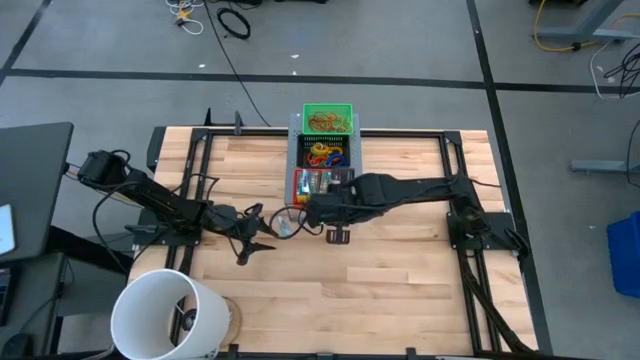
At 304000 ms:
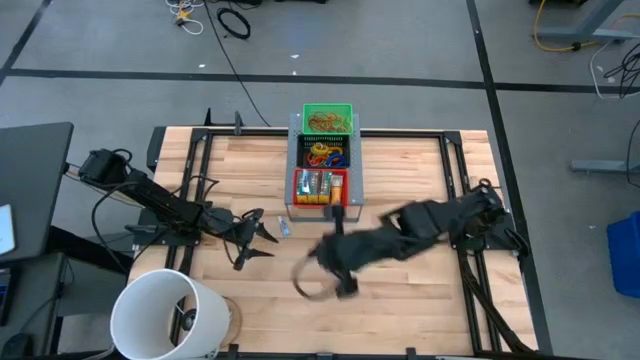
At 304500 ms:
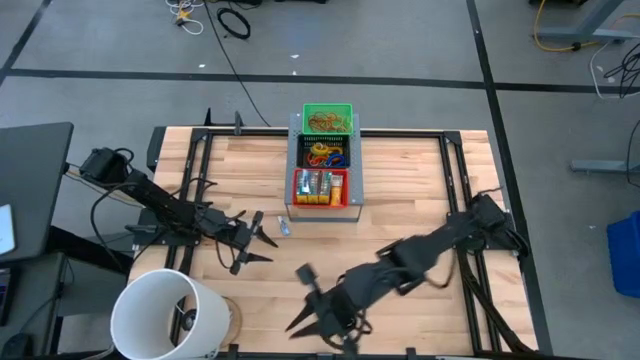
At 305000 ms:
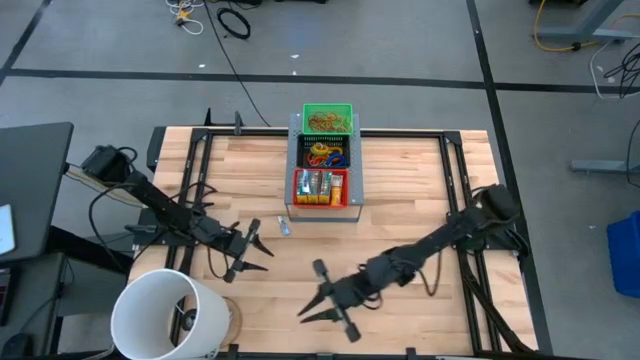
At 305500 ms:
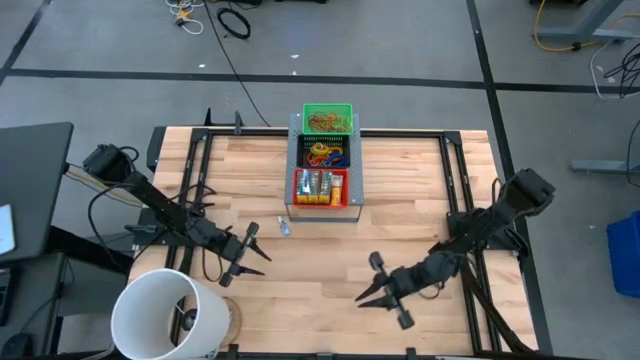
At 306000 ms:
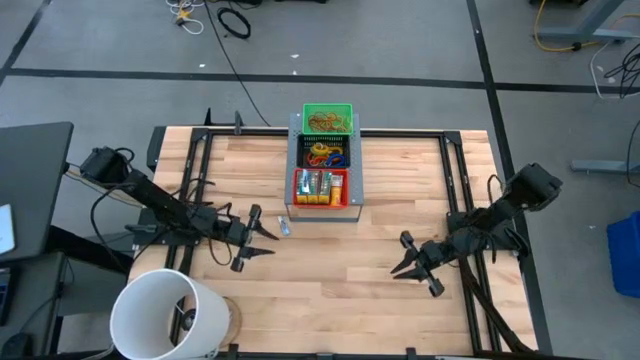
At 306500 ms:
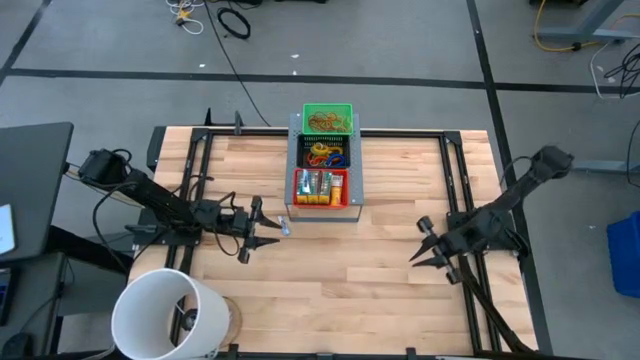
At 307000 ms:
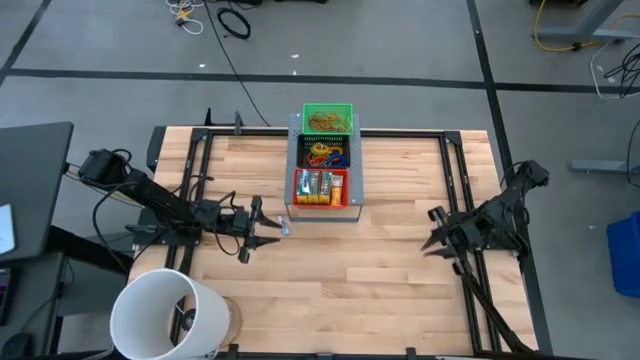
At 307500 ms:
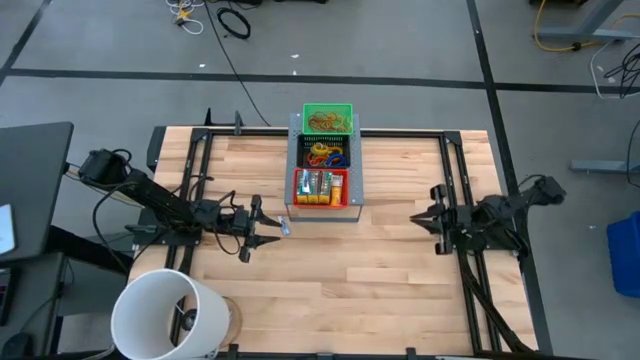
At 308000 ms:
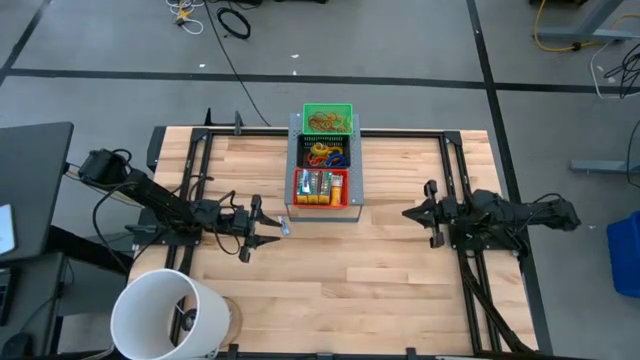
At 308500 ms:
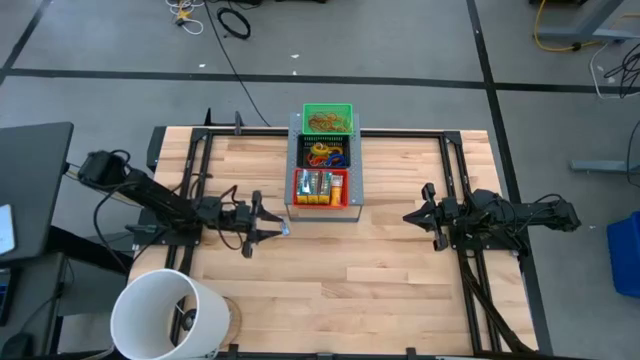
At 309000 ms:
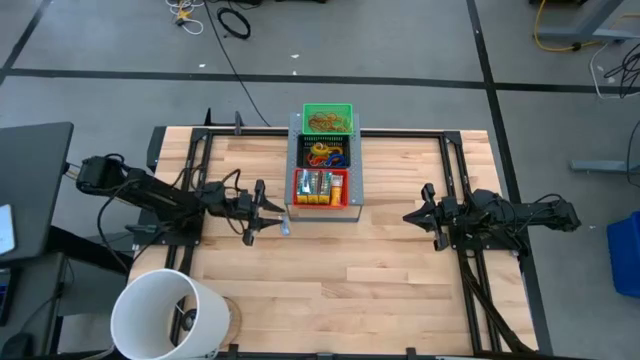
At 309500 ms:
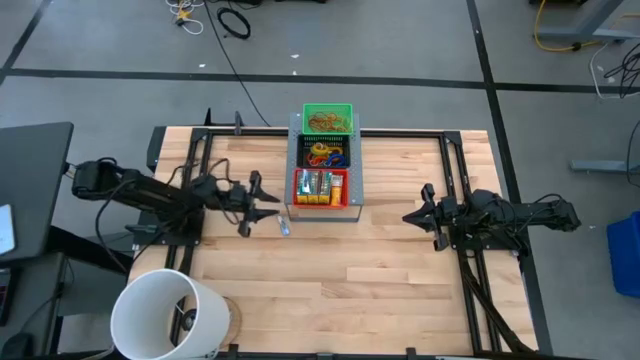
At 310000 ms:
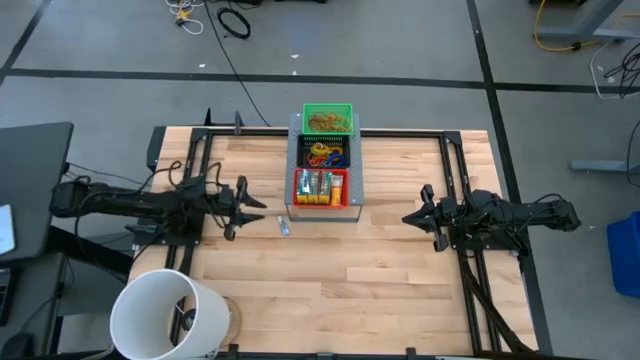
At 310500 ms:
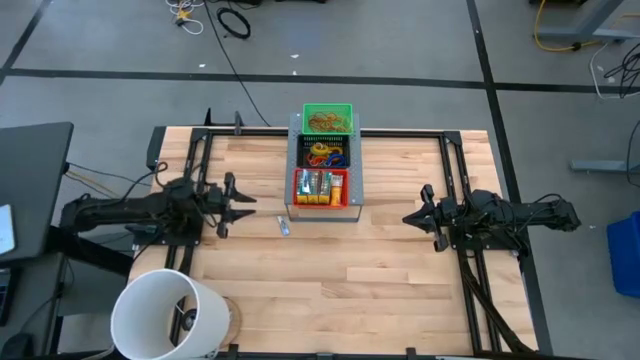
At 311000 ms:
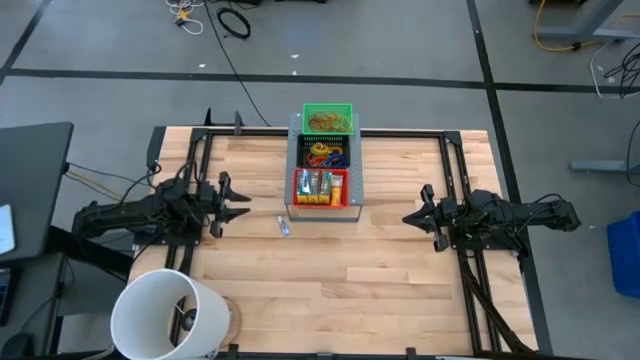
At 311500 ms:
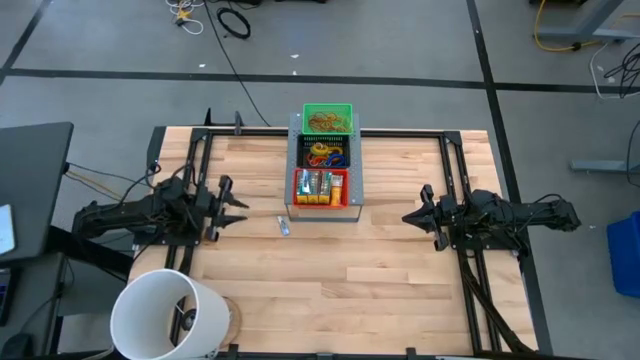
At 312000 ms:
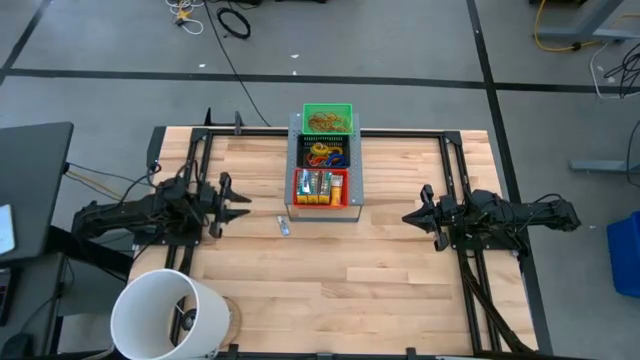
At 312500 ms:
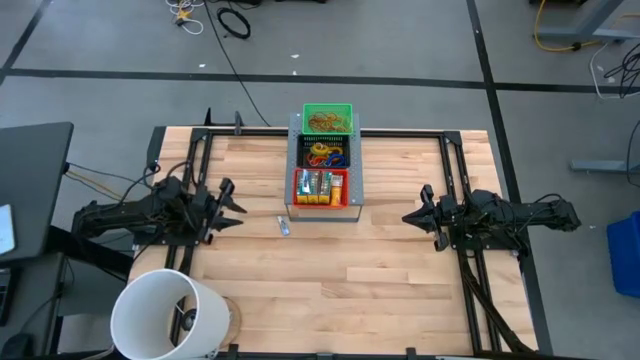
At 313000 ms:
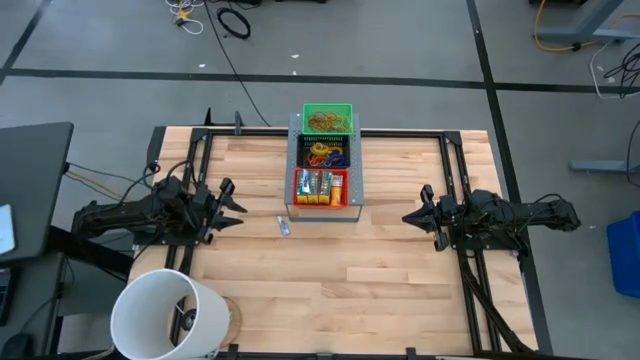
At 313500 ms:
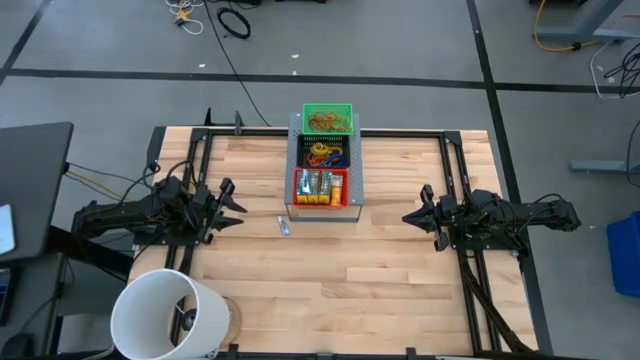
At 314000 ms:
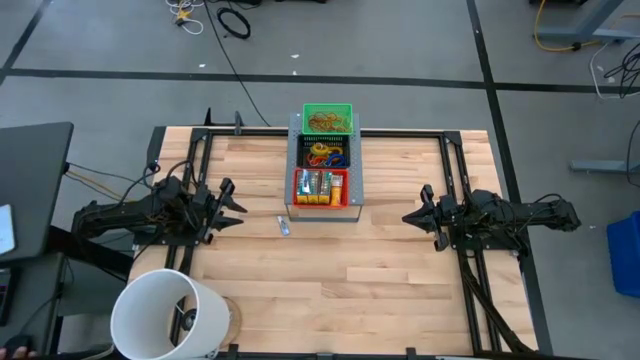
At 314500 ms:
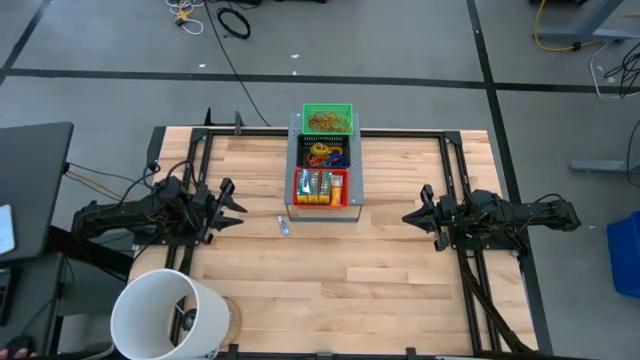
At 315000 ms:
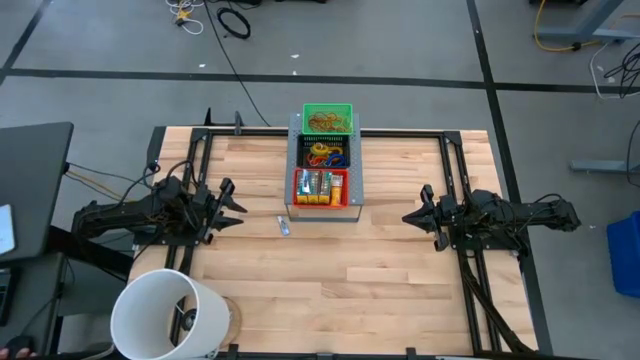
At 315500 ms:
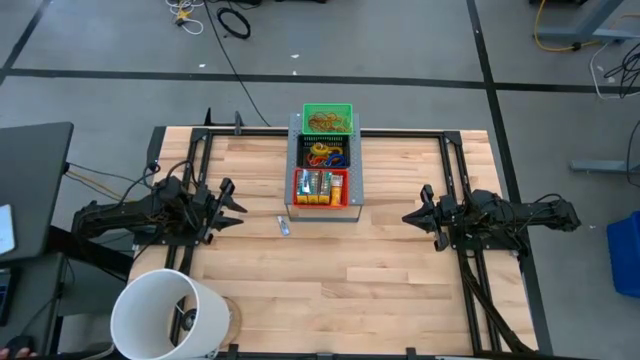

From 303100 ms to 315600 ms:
Task: Pick & Place Office Desk Supplies
Return to Home Position

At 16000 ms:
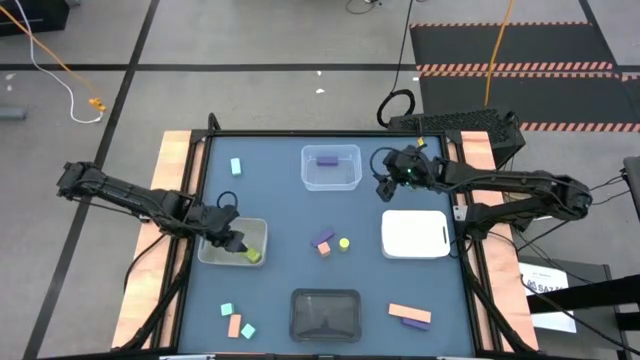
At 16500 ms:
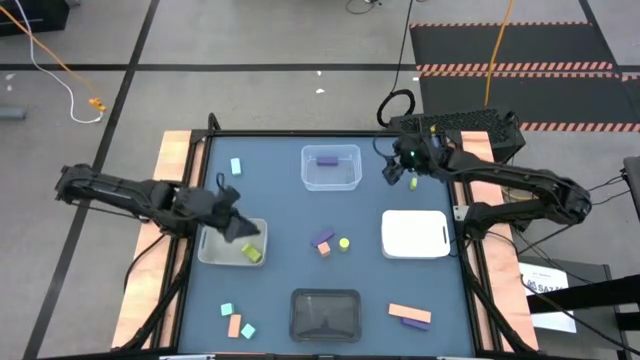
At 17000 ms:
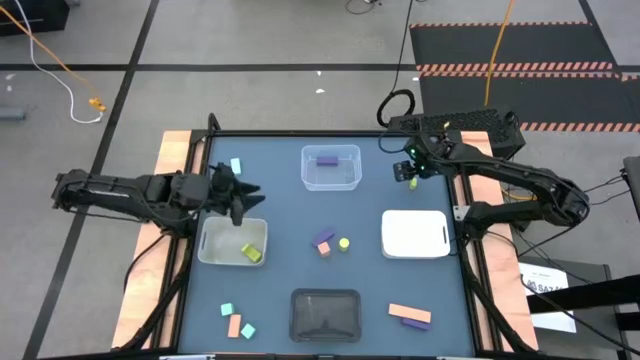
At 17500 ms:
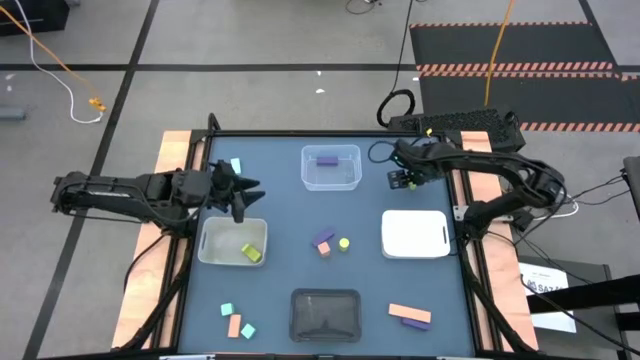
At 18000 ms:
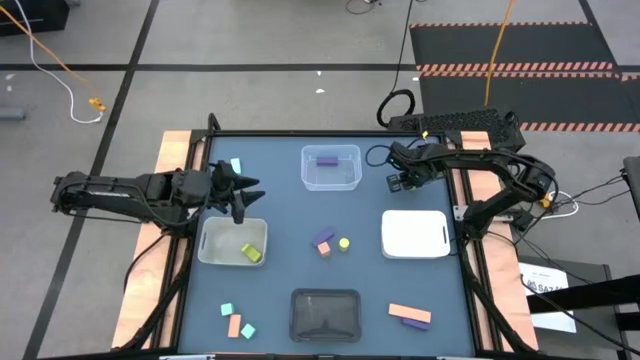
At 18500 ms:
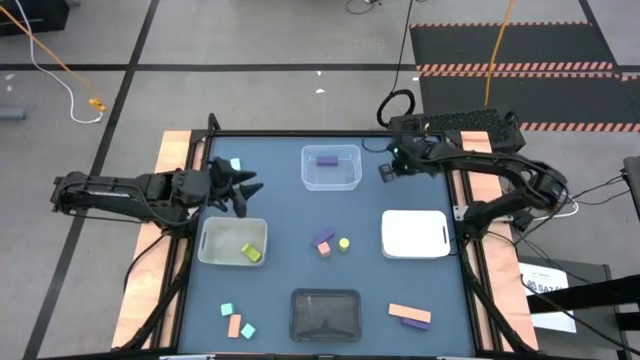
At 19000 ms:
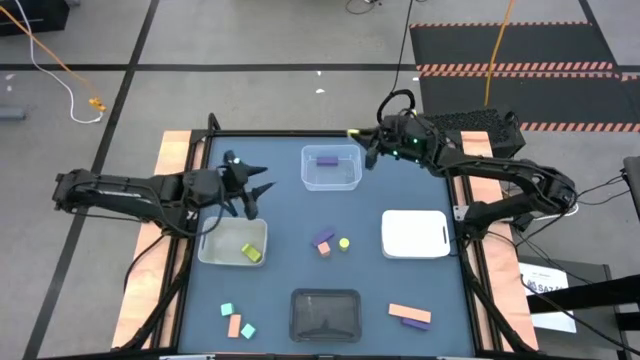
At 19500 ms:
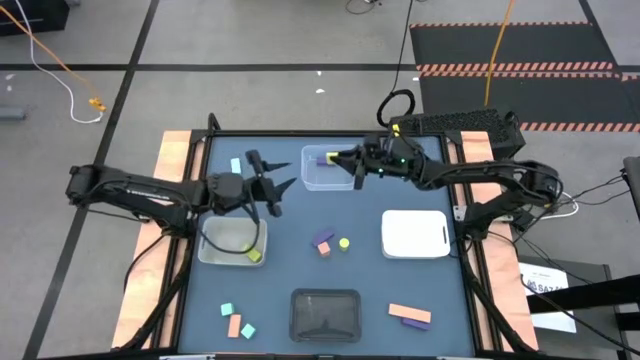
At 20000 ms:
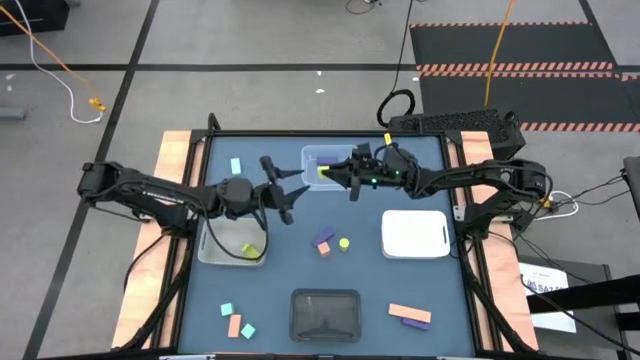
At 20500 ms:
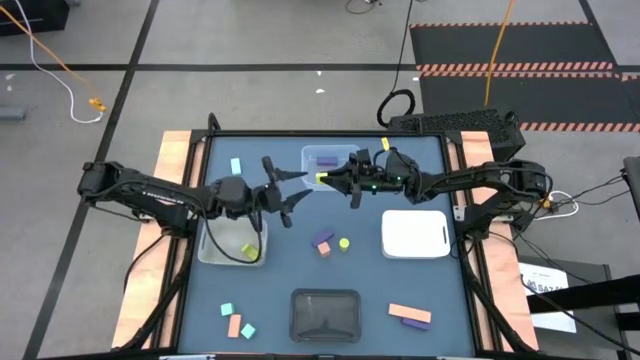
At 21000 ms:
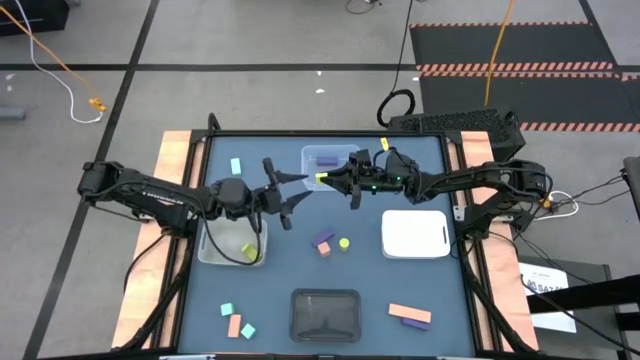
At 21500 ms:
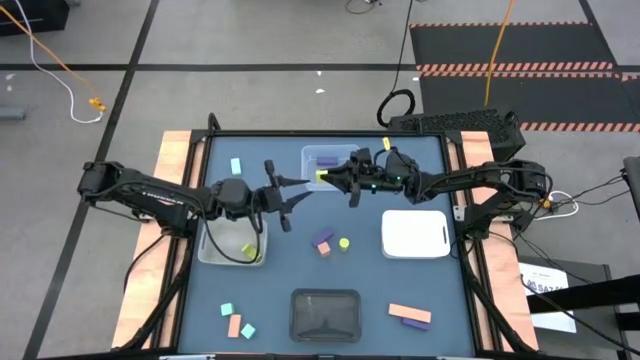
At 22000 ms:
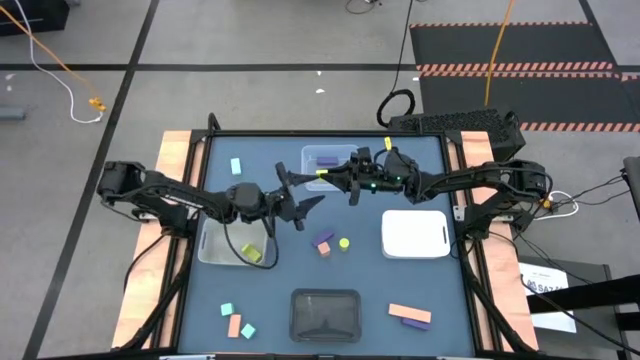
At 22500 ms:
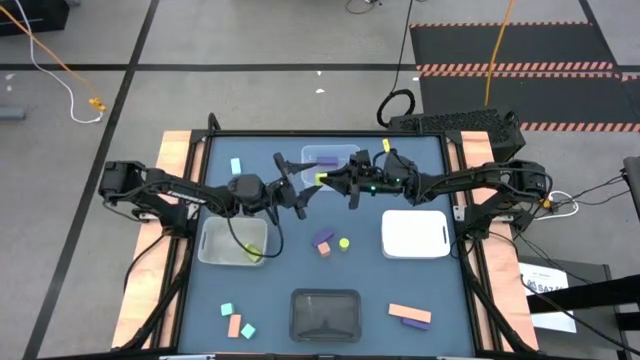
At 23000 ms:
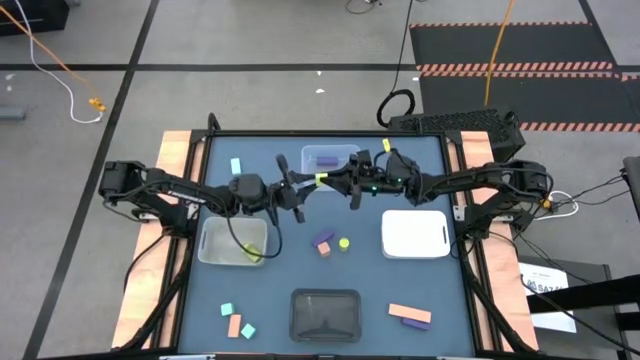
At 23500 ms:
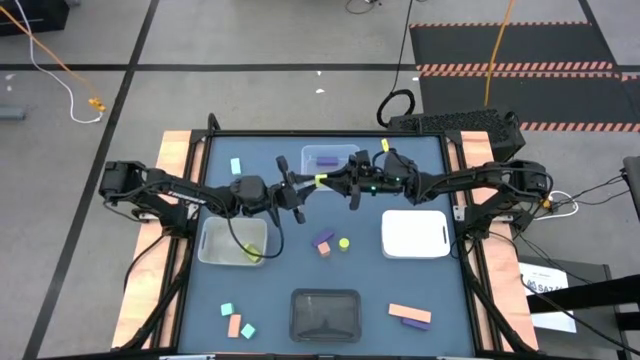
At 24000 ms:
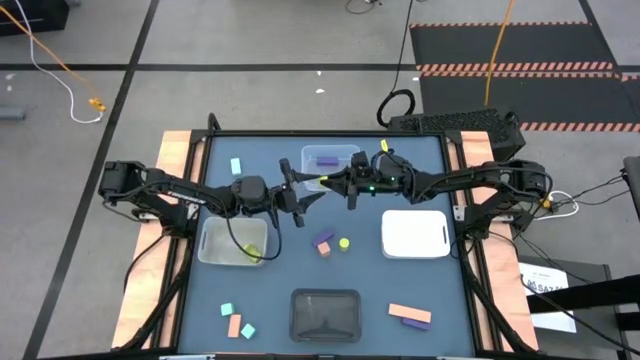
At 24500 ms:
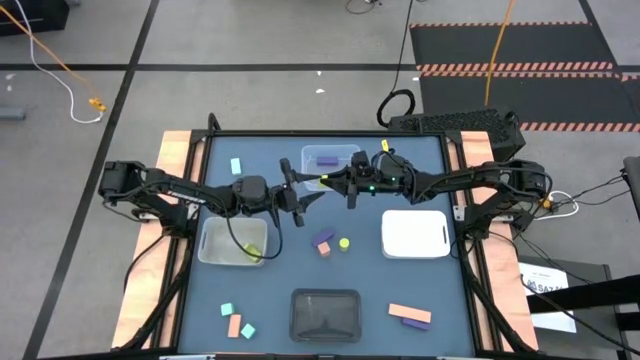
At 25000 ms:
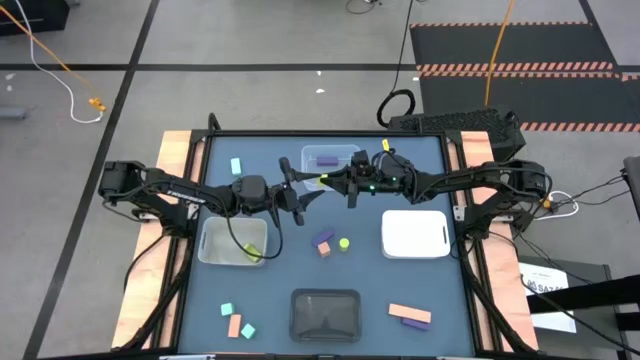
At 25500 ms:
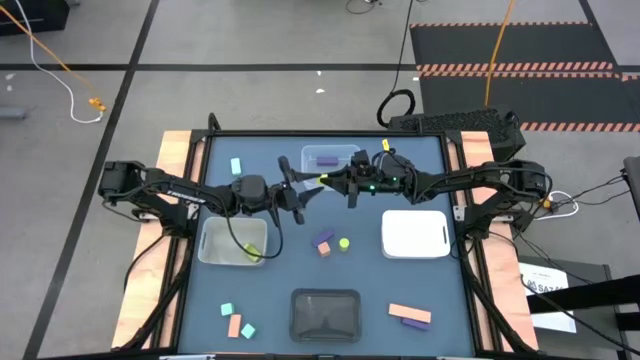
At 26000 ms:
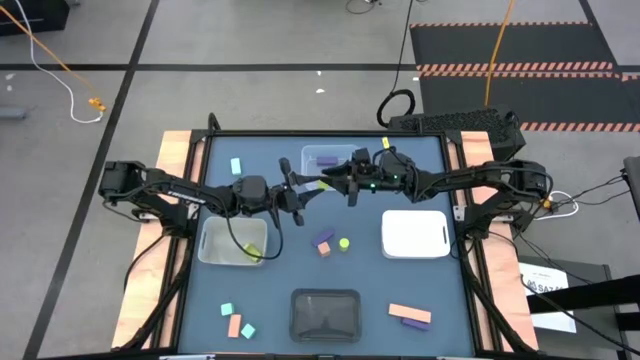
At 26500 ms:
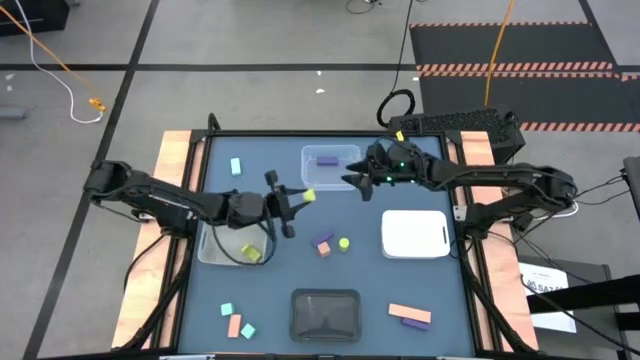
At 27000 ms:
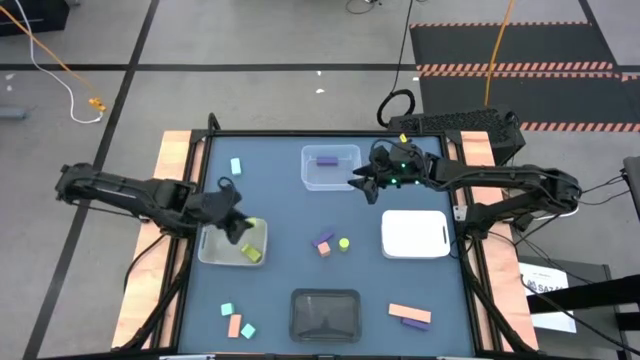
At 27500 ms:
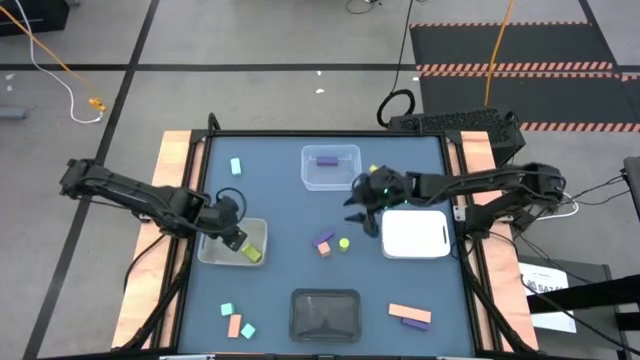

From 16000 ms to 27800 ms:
Task: Sort & place blocks by color
Put the top light yellow block into the gray bin
